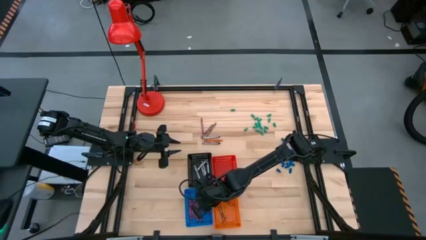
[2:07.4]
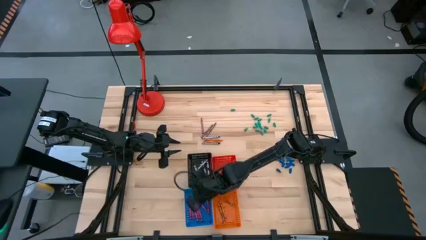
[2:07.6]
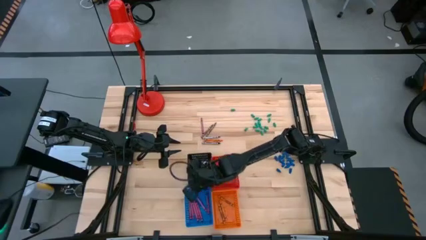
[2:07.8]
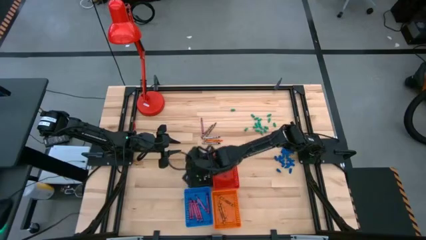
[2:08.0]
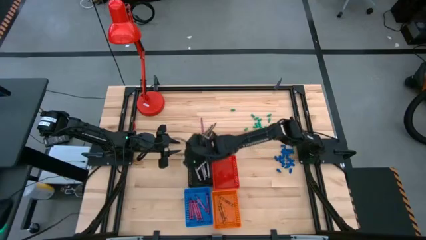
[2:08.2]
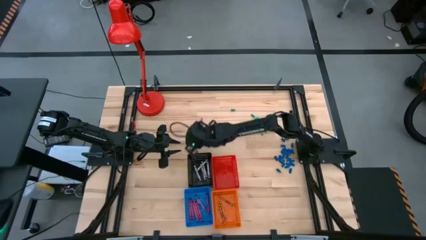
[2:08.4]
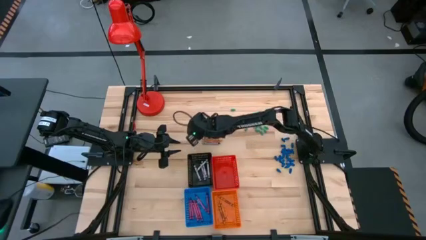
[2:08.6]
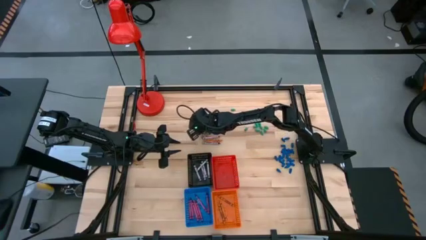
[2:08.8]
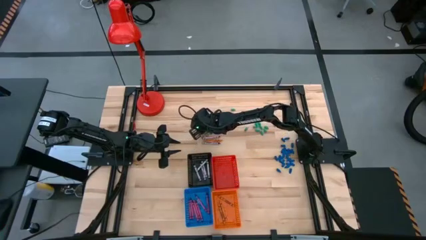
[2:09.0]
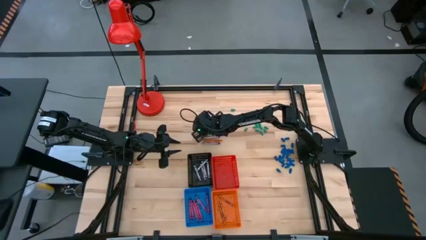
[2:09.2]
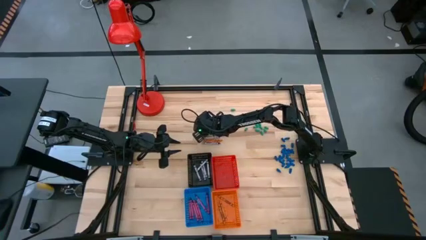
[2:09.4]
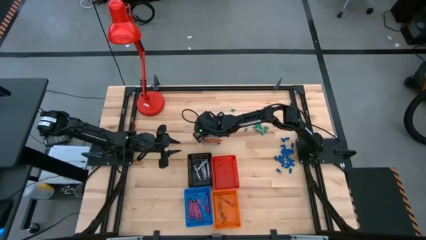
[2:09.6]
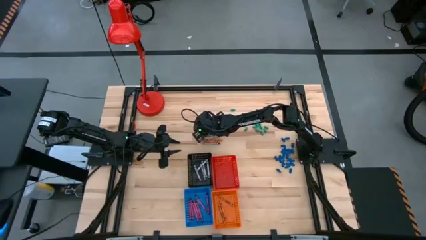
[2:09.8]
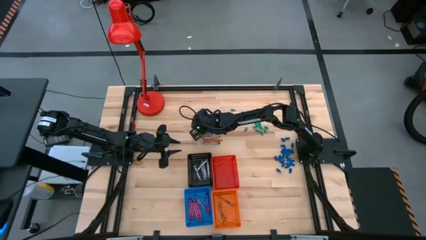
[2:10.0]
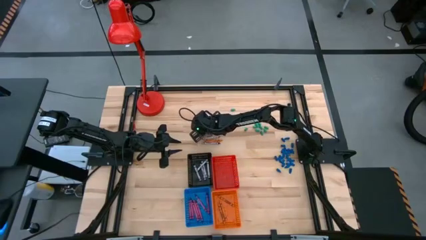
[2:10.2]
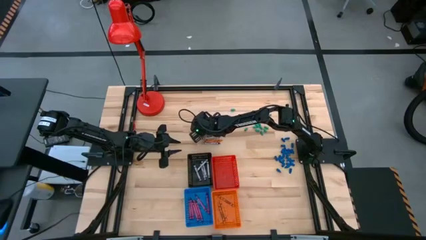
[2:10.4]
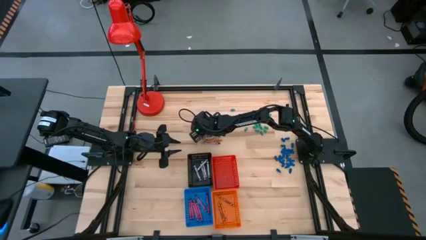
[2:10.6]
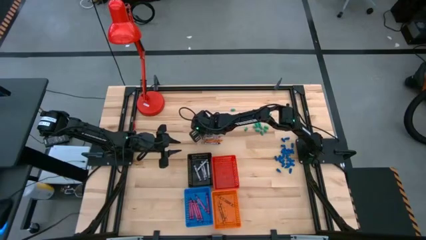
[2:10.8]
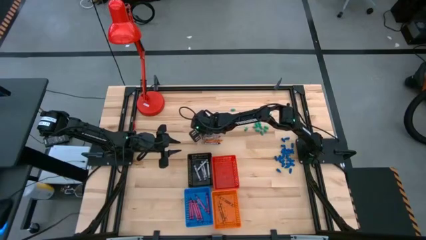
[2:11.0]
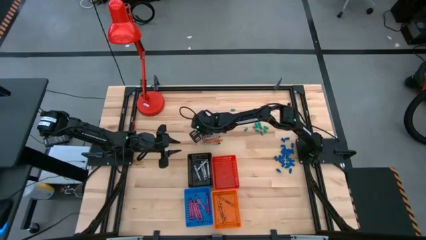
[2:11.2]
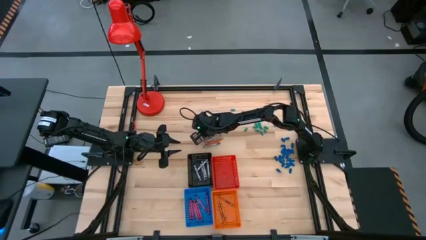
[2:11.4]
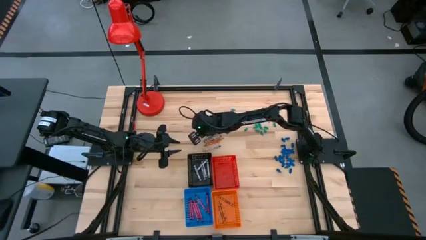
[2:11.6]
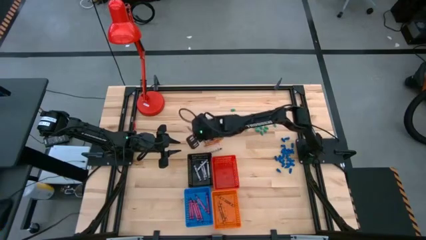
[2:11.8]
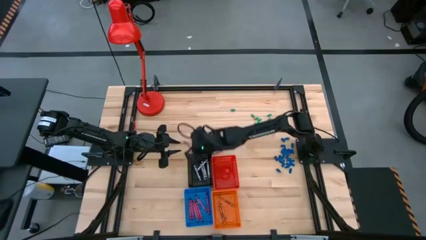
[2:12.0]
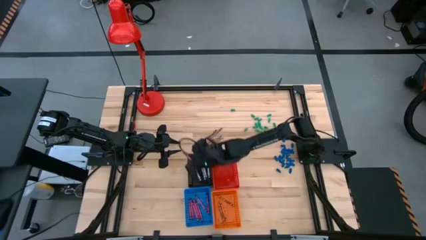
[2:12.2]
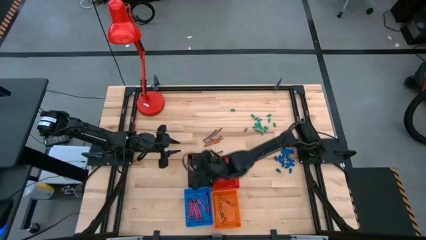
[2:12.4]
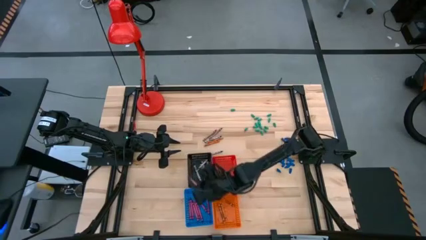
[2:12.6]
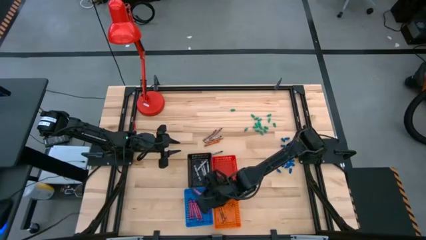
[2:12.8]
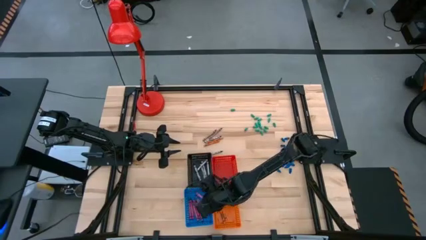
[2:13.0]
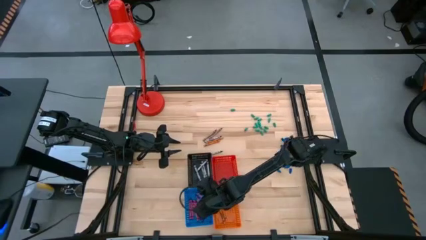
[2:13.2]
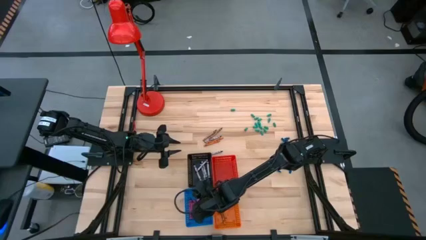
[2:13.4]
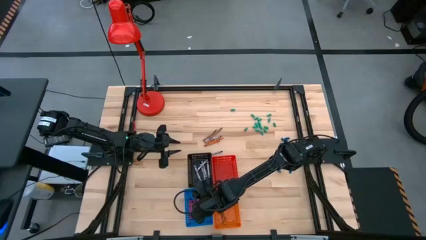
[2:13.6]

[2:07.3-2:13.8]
Task: Sort crayons
Put the red crayon into the blue basket

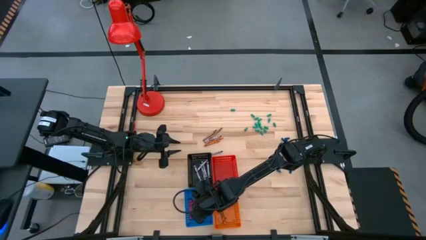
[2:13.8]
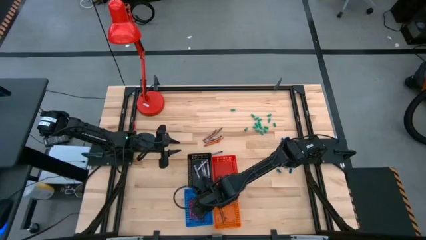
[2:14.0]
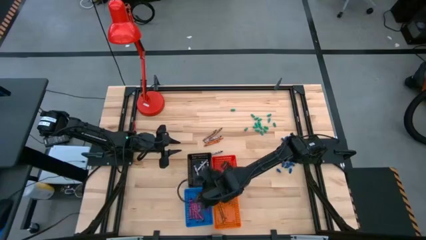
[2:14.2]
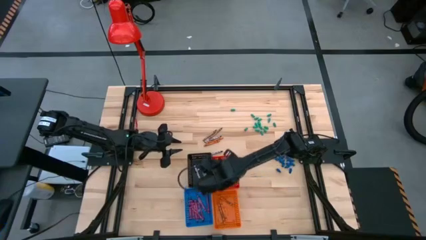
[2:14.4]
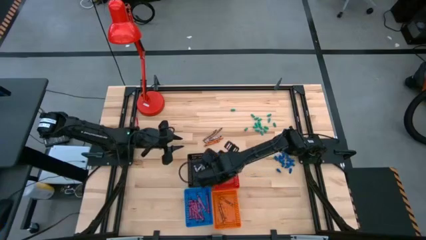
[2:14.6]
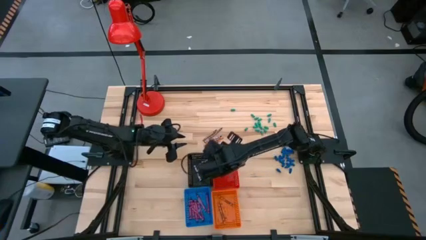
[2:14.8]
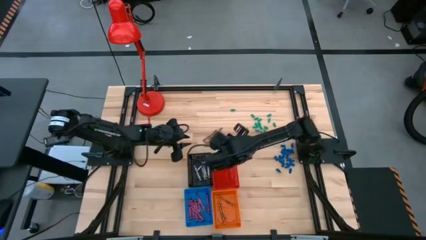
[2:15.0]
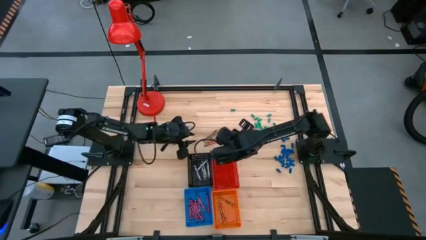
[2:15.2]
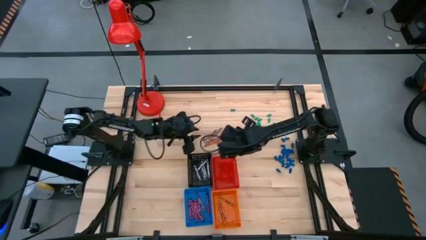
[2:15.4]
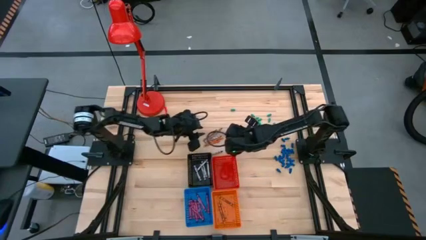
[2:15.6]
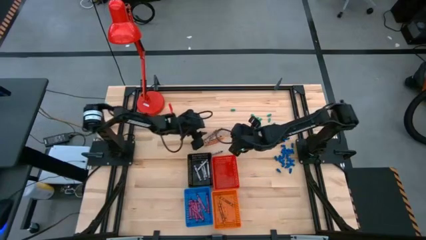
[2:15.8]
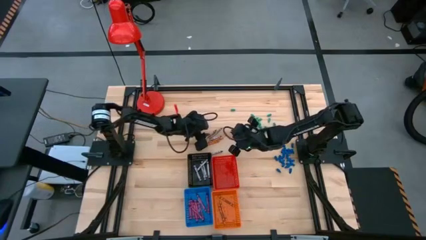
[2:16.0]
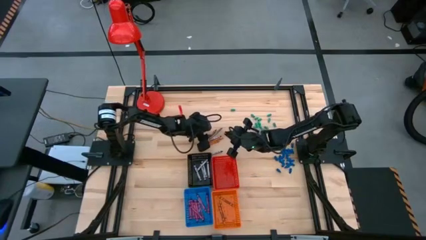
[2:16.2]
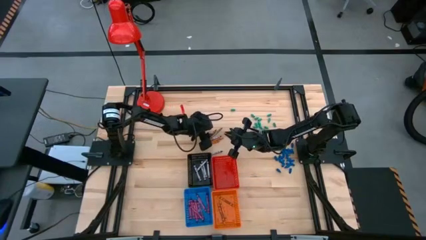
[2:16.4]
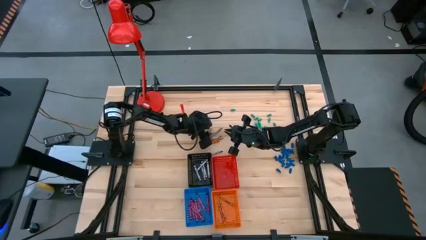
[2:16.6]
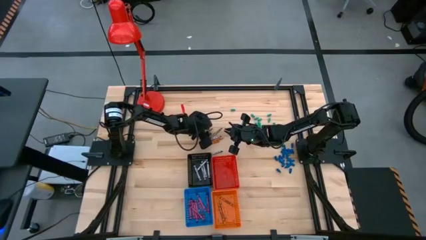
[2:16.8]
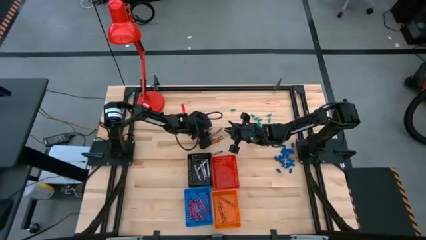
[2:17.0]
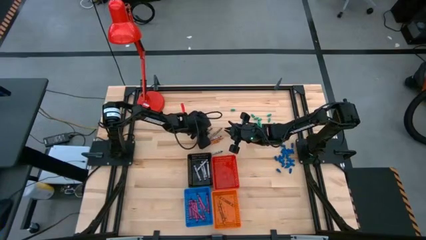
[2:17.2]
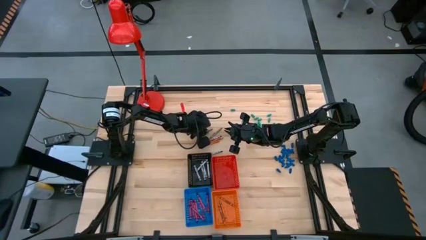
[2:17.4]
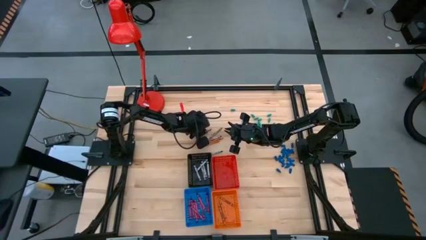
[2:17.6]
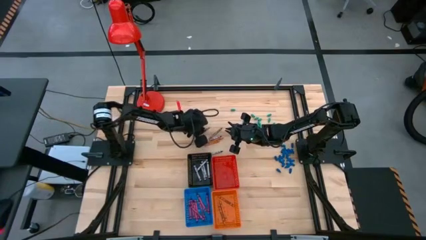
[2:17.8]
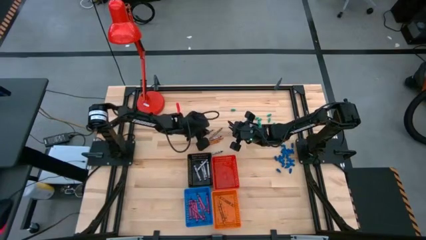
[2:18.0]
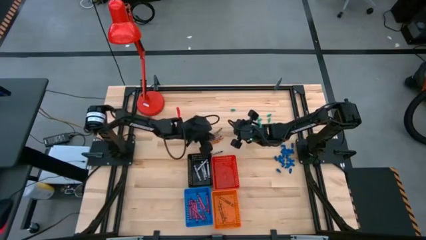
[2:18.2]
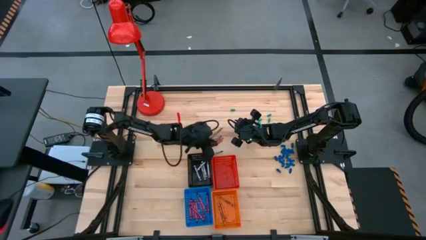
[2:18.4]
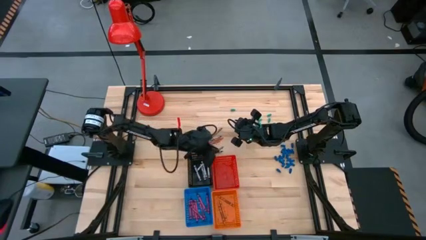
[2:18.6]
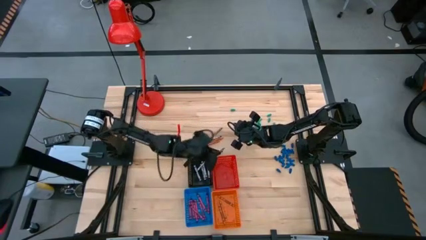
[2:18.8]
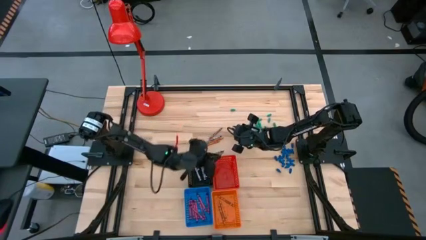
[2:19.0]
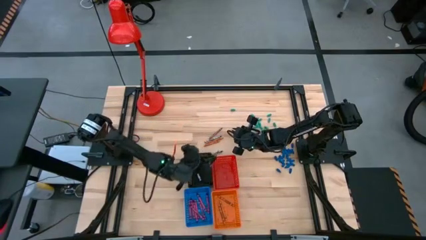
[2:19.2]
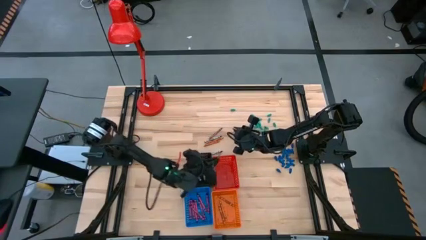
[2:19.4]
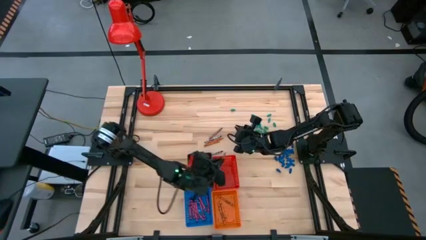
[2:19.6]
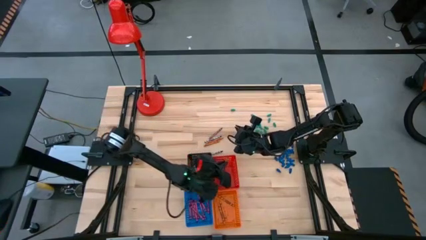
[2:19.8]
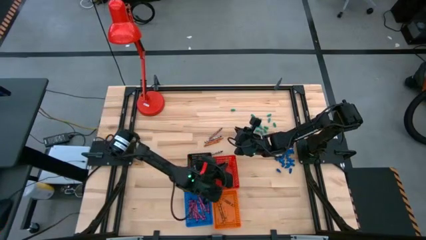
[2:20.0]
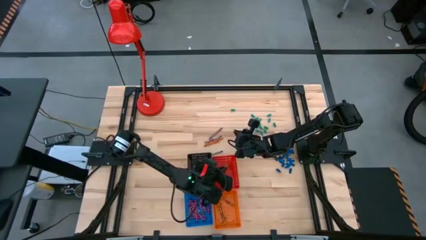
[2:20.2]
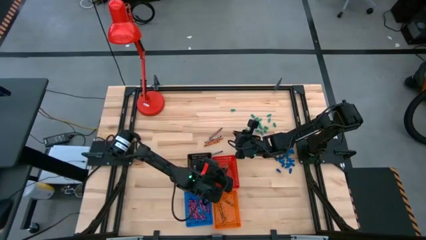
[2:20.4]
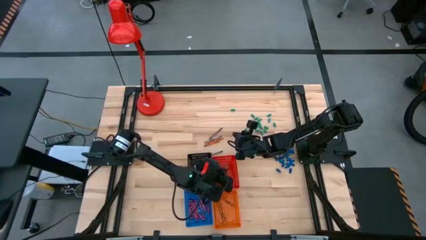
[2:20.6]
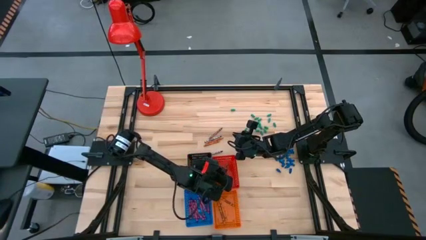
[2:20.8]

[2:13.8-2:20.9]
Put the brown crayon into the red basket

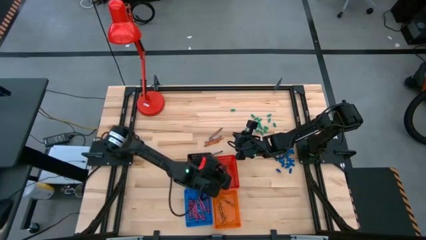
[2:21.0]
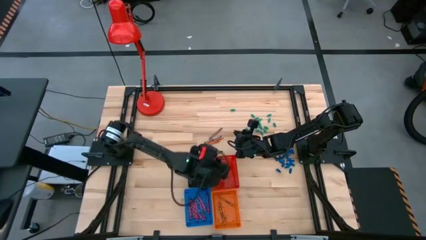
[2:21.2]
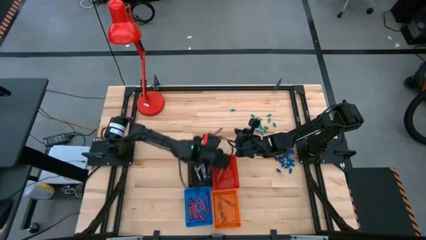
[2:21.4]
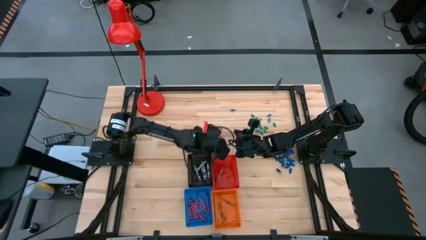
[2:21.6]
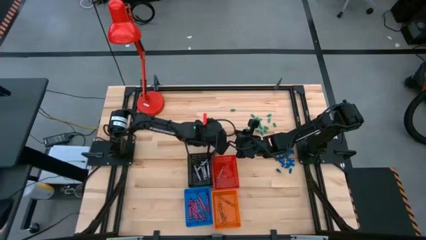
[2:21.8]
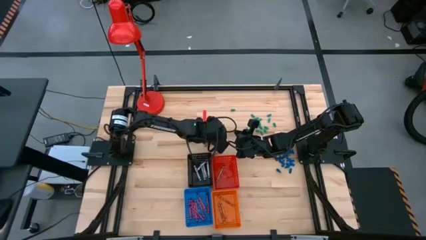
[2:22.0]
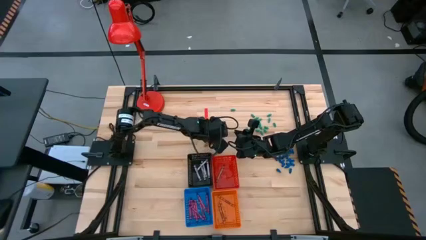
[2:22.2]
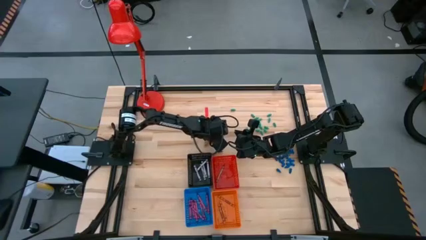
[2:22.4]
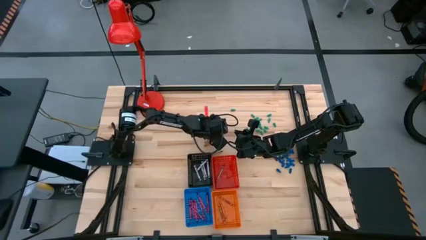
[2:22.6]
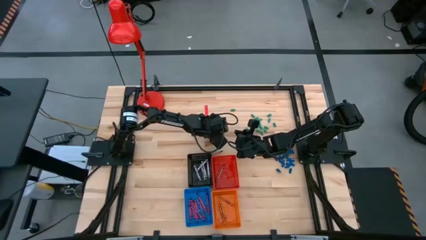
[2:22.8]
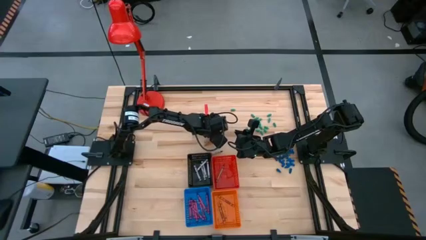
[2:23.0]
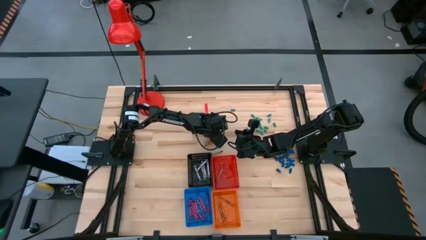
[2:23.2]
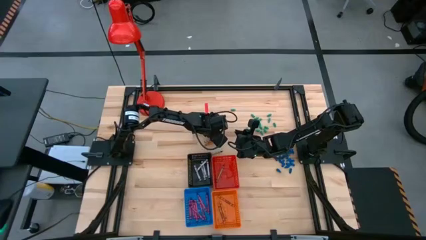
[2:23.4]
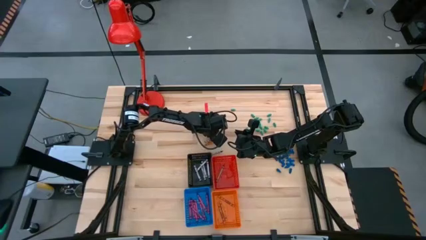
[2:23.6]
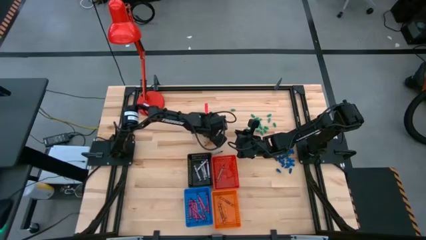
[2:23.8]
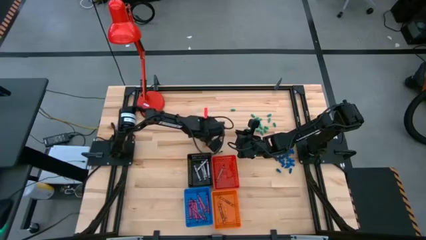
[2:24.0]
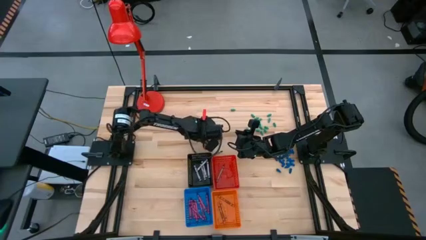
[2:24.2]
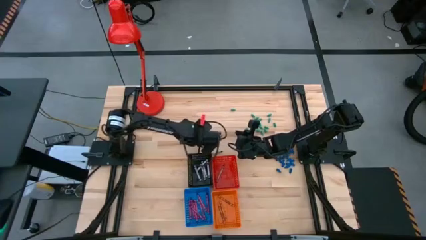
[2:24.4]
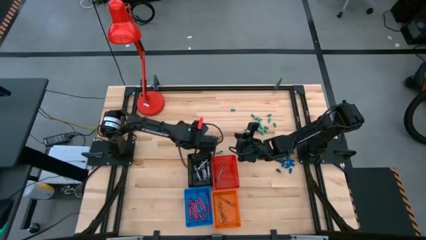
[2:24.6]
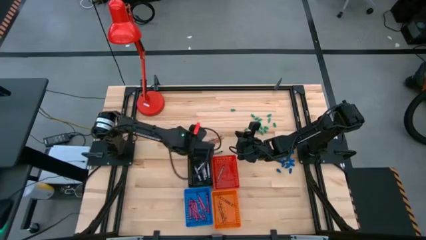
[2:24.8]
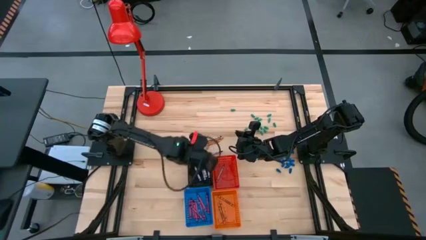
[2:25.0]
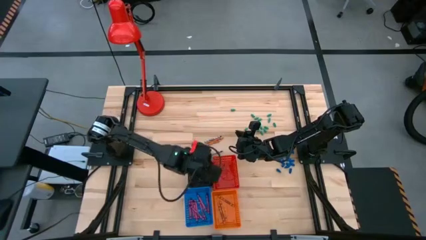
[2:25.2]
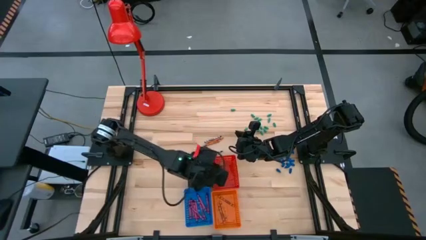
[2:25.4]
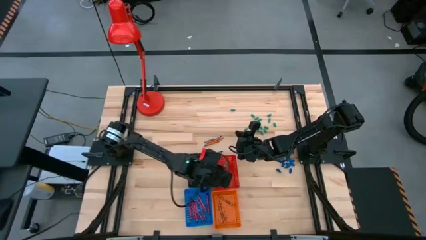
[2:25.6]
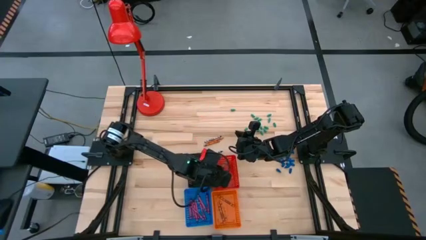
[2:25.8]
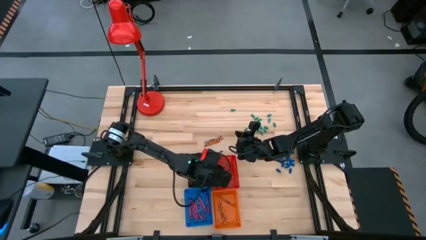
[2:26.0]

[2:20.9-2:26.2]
Put the brown crayon into the red basket
